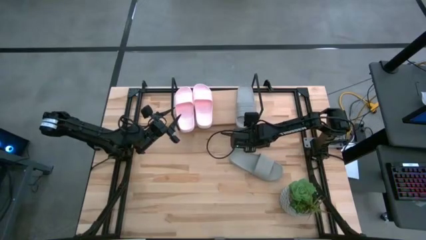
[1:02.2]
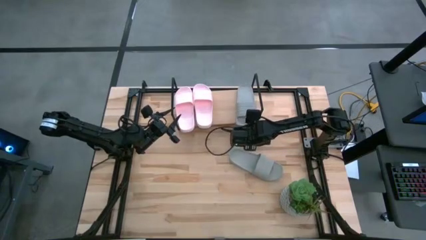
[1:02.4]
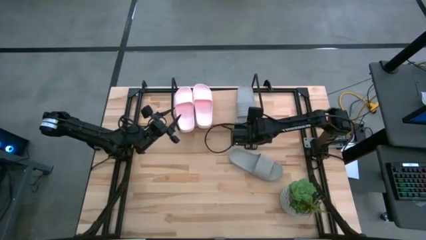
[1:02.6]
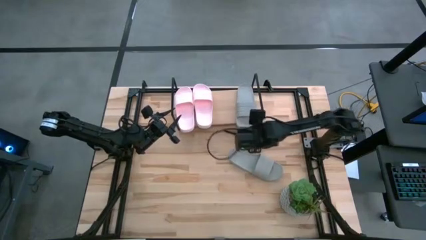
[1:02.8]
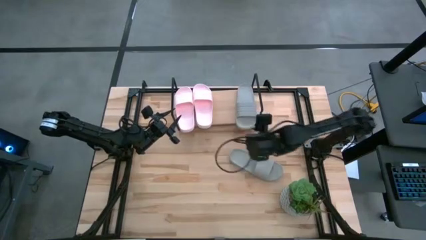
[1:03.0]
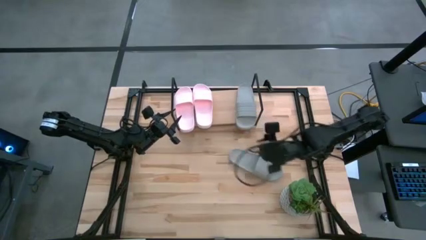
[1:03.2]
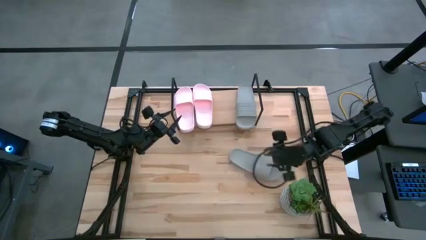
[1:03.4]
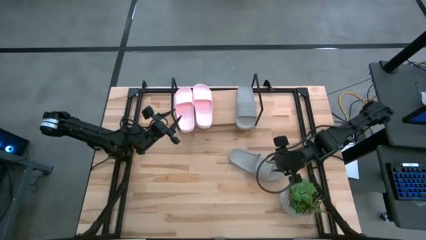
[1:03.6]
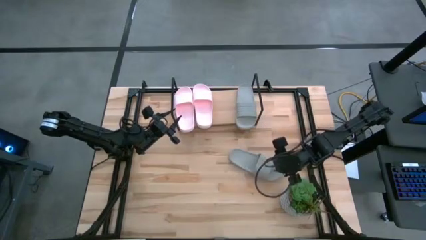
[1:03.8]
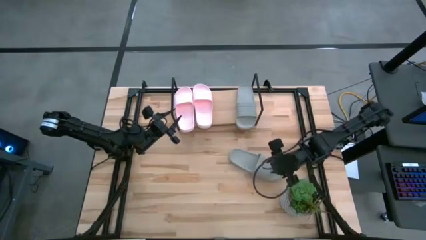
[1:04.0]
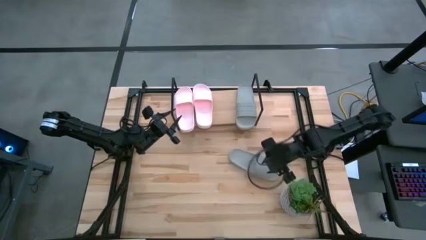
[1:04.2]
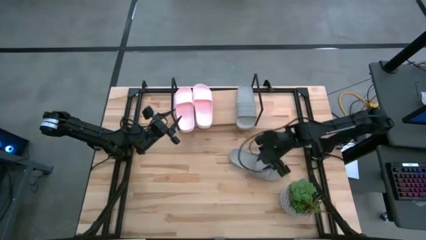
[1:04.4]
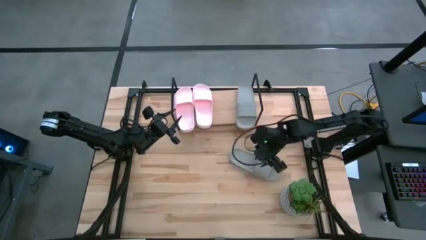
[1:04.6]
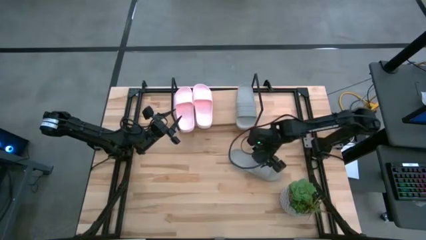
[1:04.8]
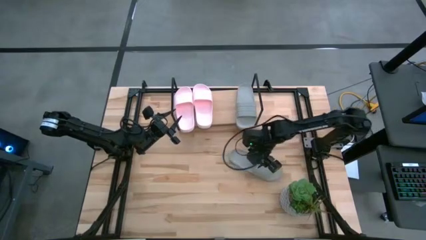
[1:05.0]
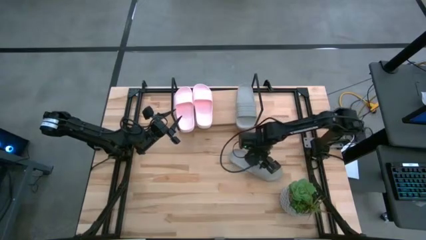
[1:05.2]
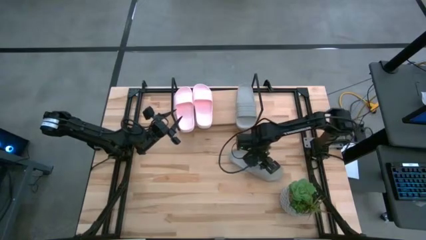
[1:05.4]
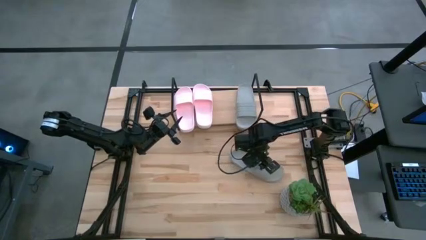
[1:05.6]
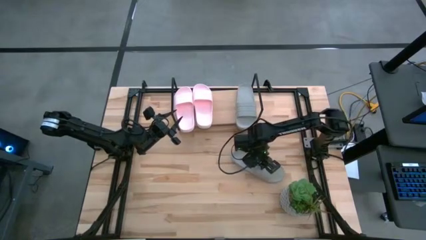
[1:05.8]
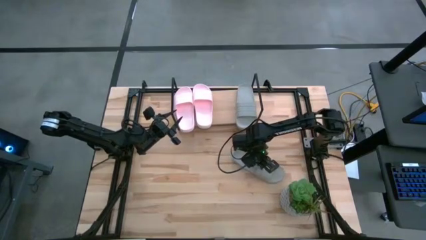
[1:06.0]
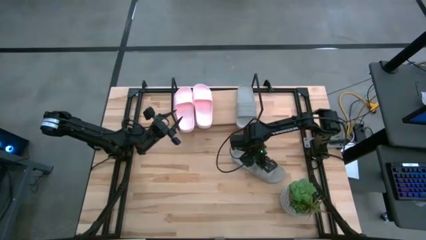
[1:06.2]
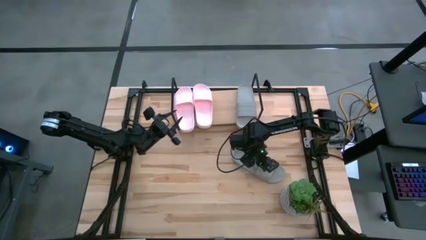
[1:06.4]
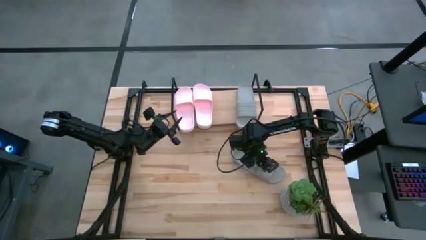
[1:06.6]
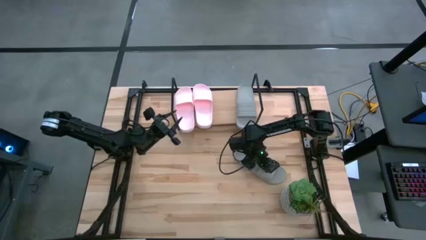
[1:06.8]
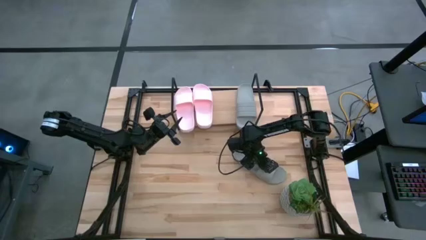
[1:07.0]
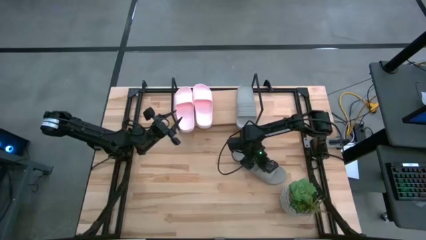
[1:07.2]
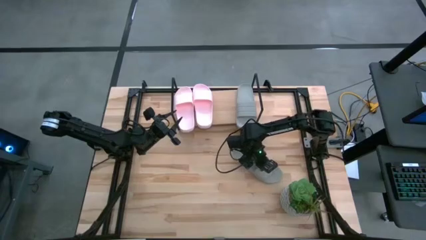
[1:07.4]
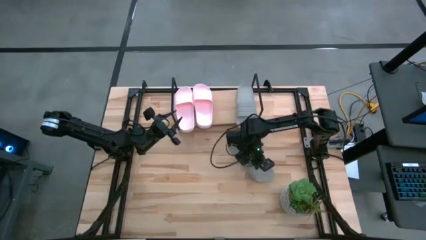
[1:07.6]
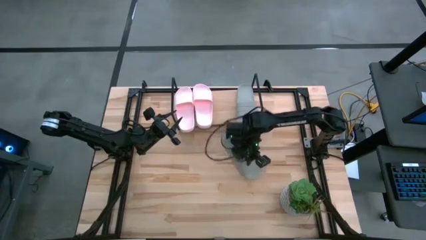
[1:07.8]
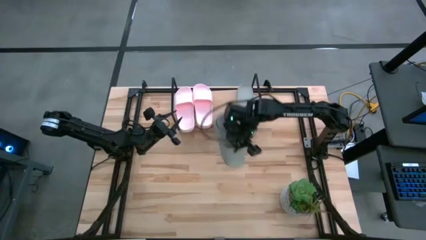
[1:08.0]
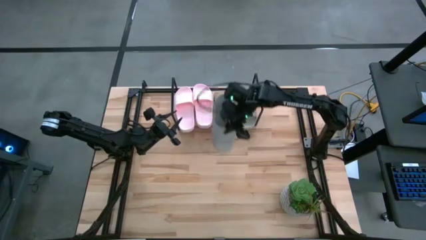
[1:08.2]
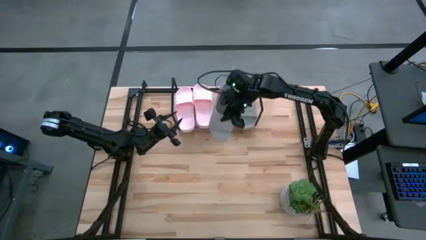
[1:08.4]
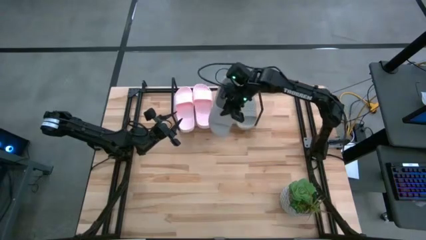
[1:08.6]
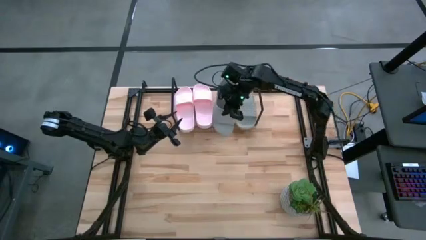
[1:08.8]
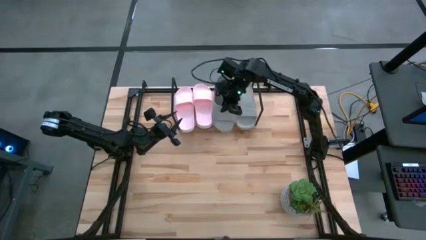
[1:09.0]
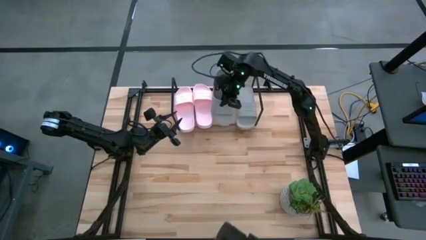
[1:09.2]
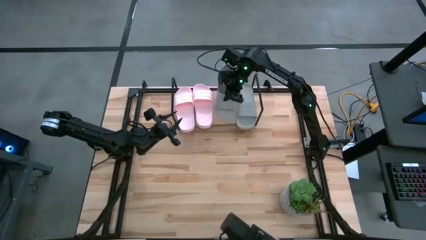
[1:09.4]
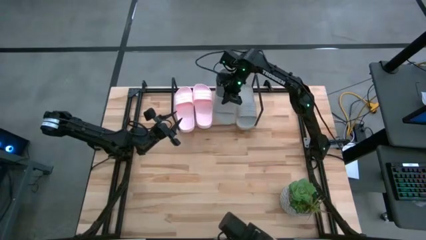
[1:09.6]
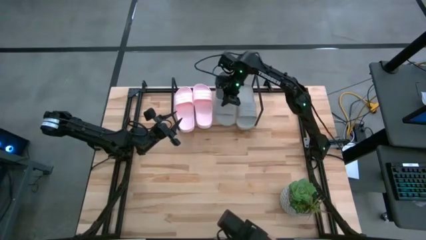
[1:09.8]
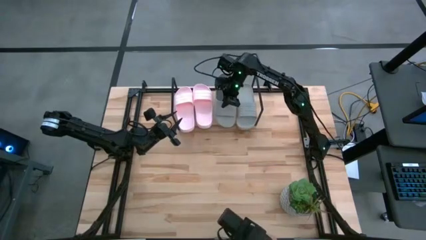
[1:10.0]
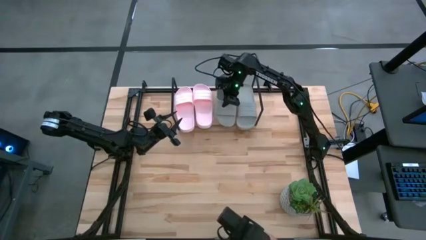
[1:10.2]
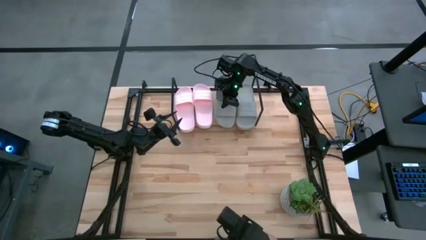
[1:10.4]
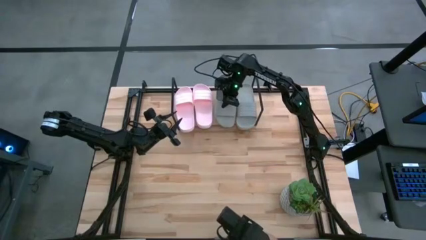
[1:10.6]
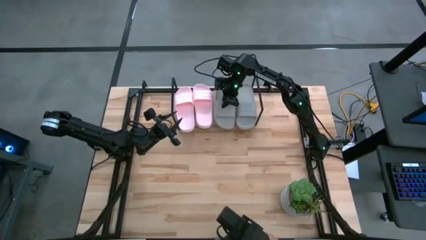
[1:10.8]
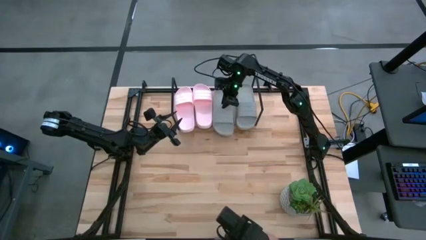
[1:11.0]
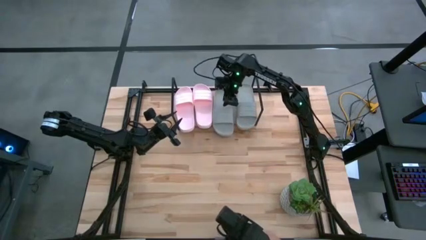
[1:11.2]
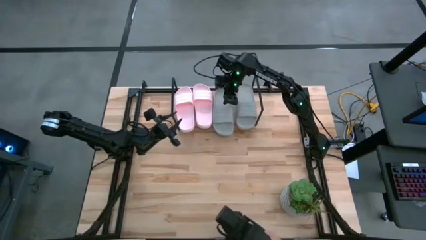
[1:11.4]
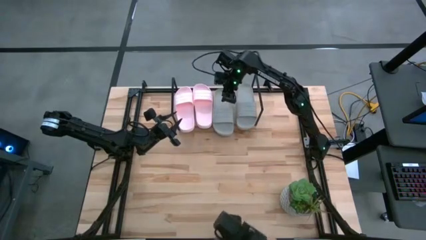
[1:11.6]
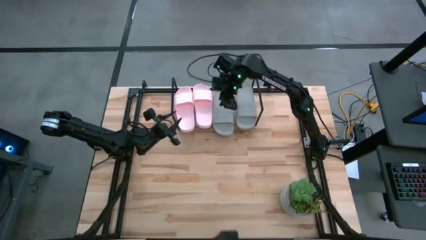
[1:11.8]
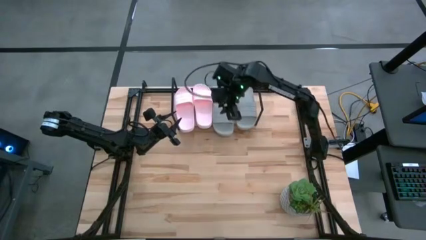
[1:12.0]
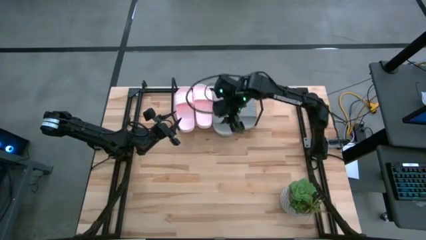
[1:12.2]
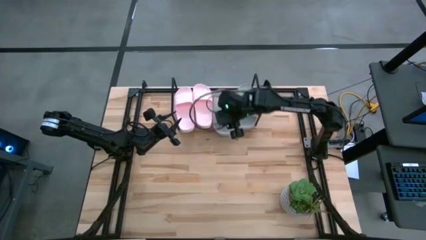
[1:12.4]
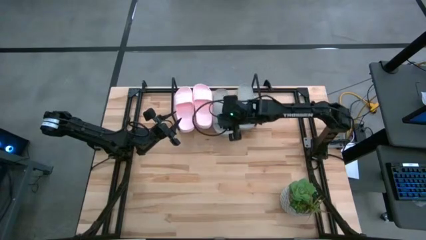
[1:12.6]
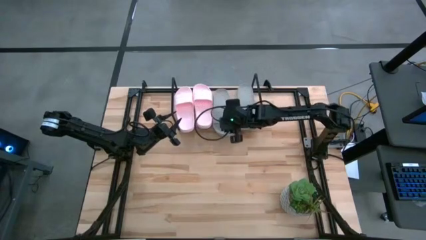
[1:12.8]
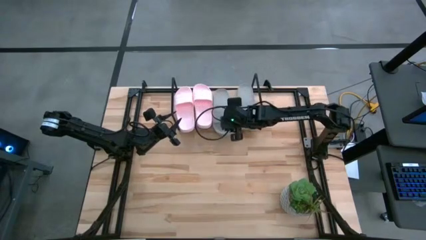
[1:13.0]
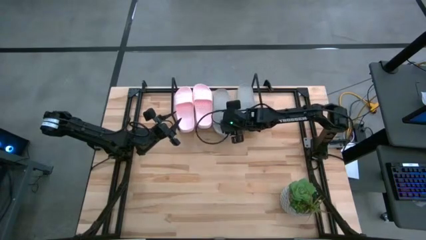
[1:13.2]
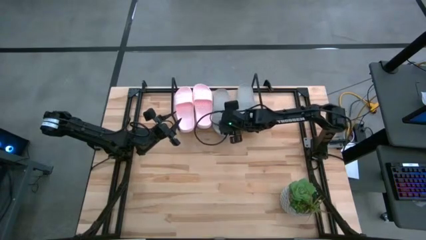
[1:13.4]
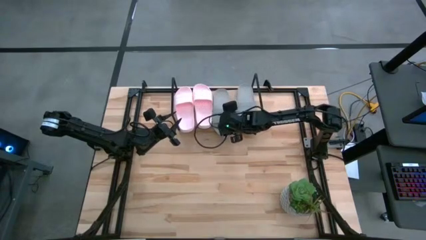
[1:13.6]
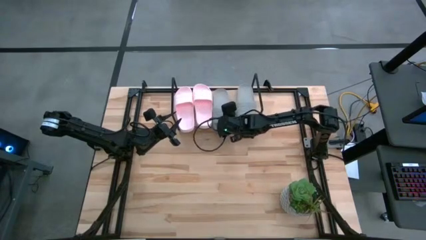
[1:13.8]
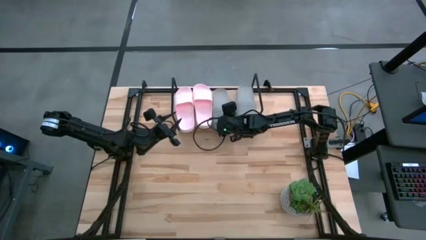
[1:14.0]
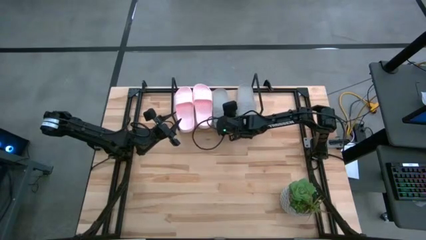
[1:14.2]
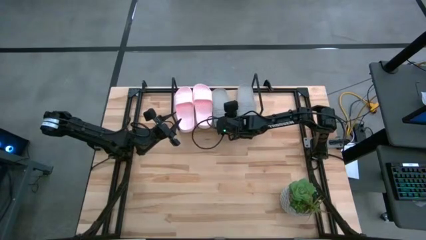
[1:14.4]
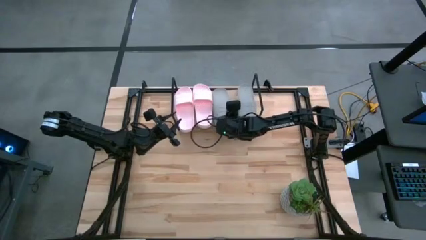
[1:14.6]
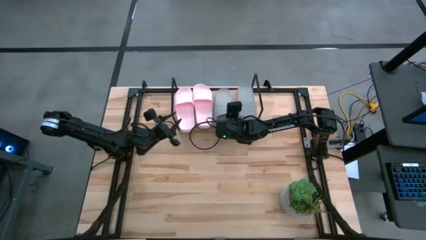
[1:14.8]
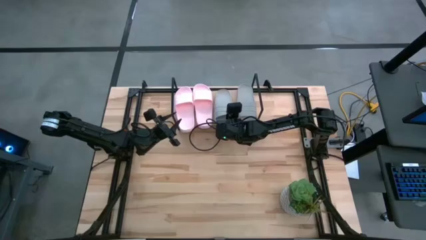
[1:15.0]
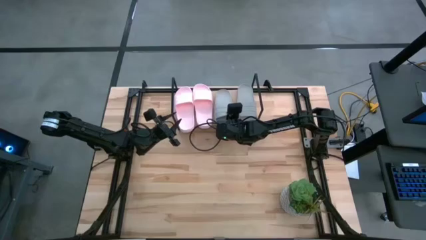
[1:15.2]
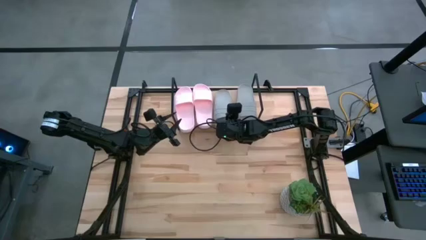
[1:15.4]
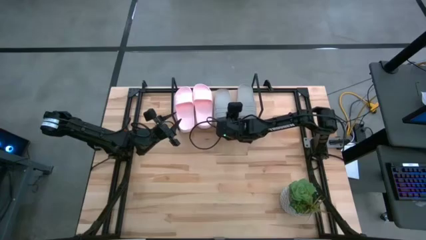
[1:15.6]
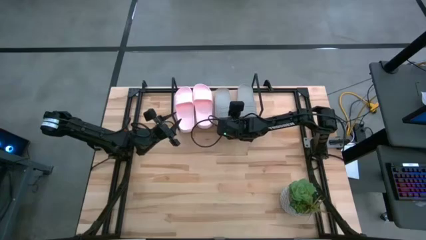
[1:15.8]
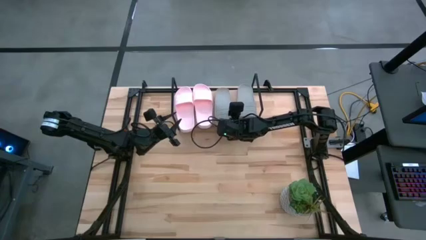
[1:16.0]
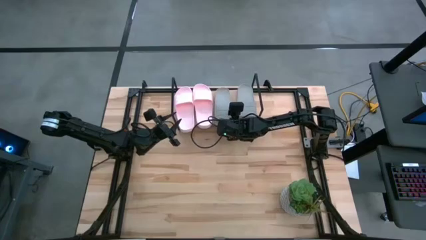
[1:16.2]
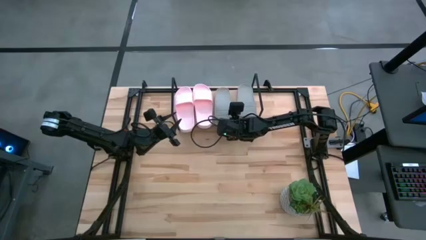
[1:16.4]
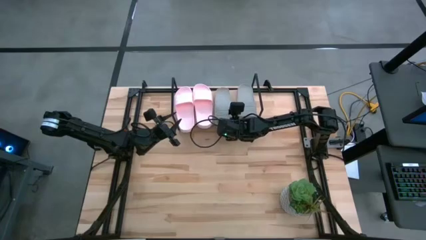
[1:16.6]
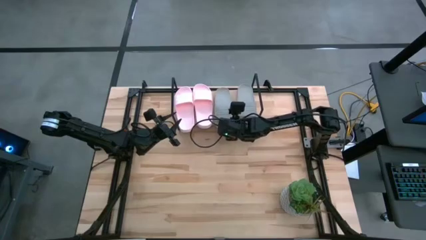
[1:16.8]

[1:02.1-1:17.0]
Task: Pick and place slides into the shelf
Put the gray slides on the shelf

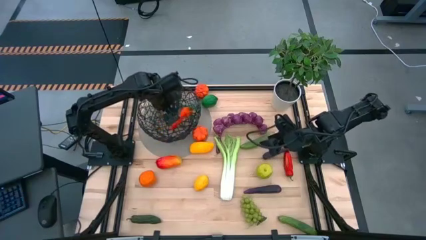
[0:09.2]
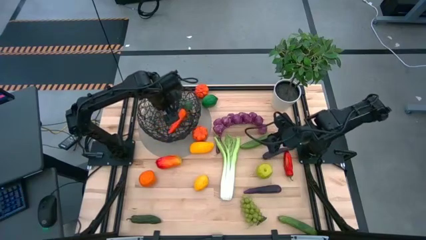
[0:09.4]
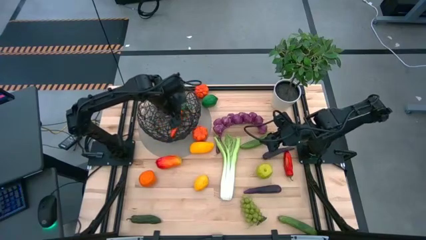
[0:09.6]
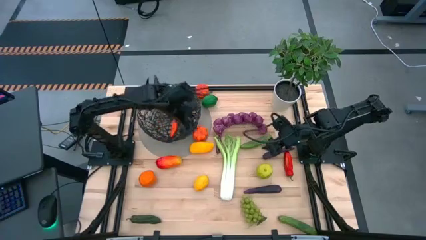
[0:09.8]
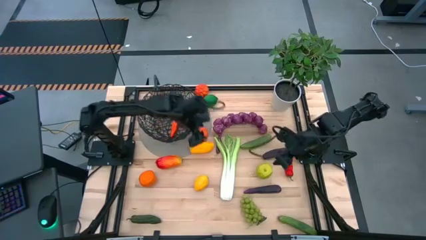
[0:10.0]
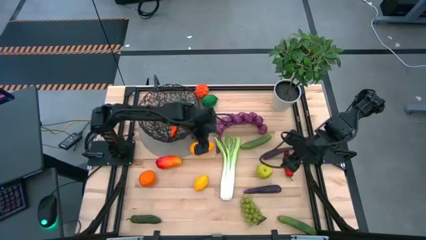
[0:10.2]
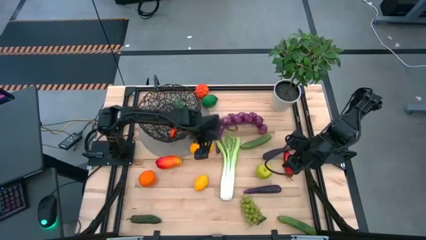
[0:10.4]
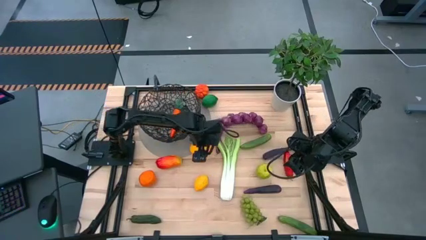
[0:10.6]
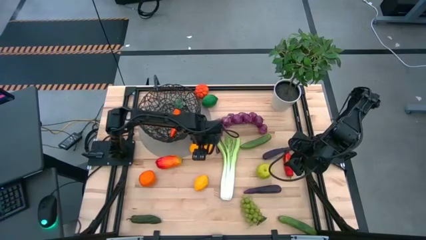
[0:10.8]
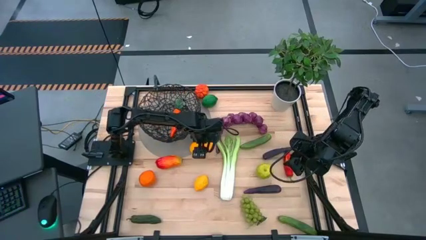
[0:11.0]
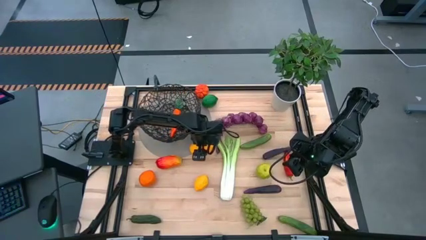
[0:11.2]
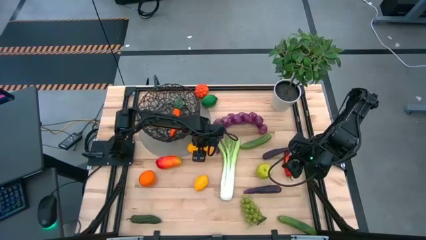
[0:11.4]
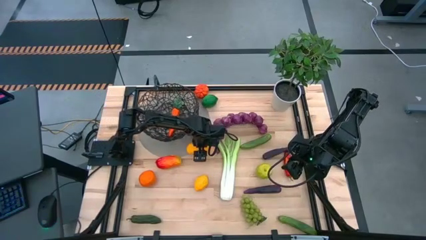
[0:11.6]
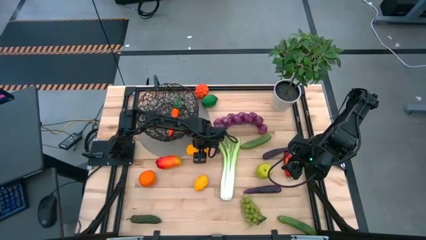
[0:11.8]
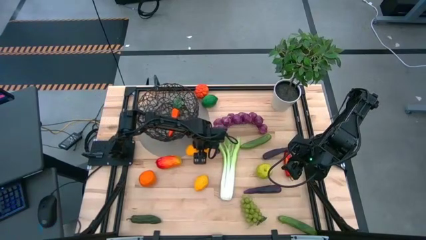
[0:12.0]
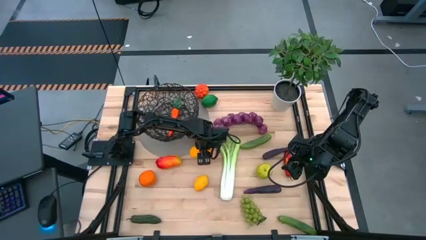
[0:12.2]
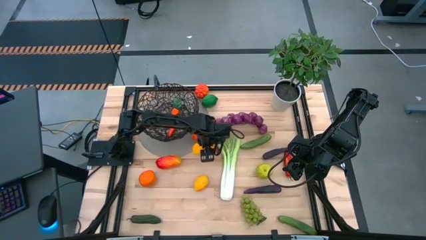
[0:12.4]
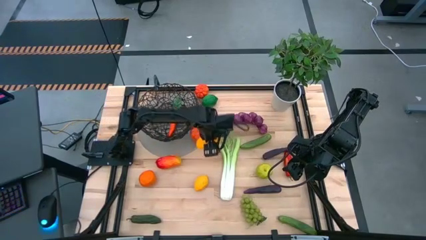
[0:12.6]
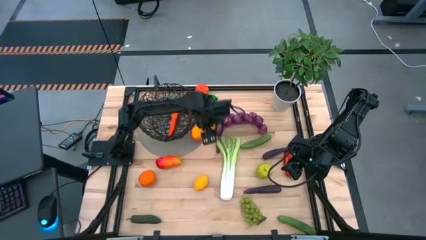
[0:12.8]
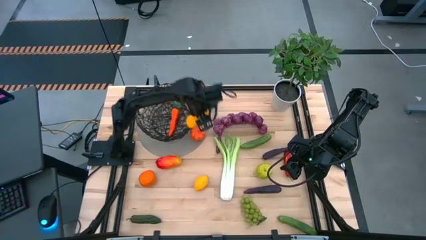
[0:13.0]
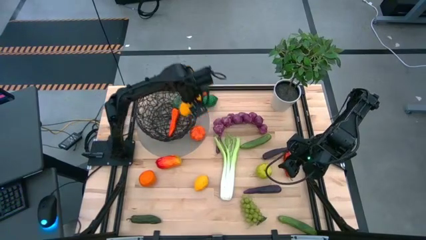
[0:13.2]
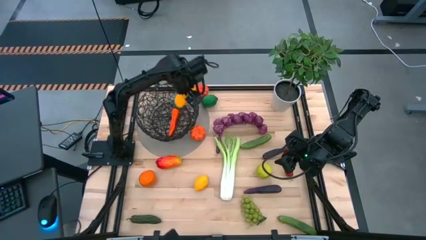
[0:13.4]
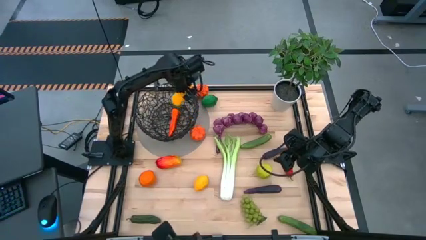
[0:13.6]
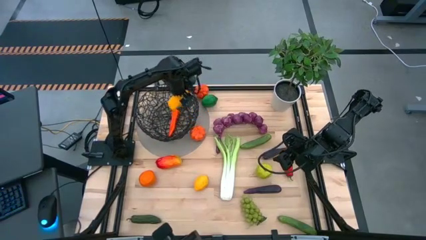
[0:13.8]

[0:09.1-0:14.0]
Task: Build produce basket
Put the yellow mango into the wire basket
